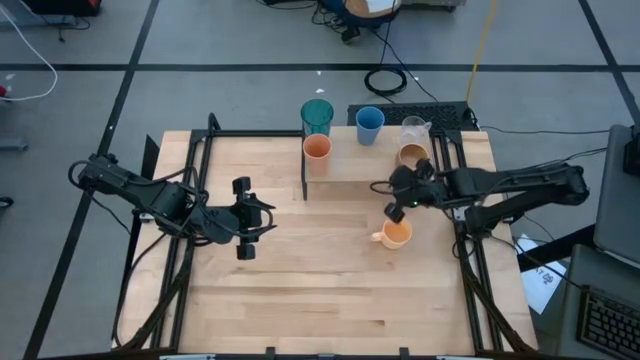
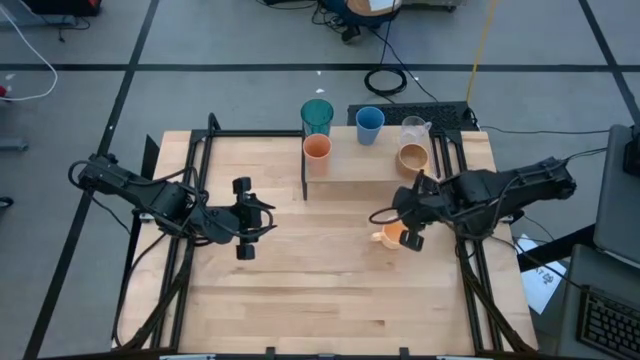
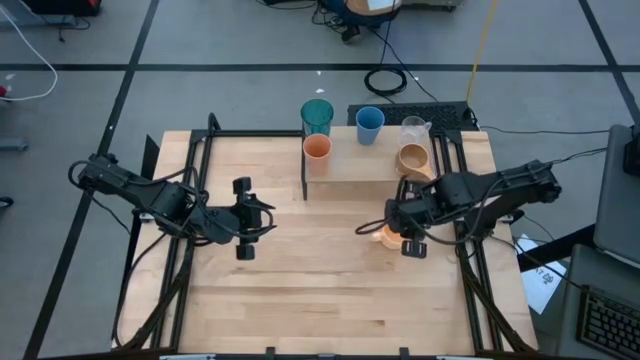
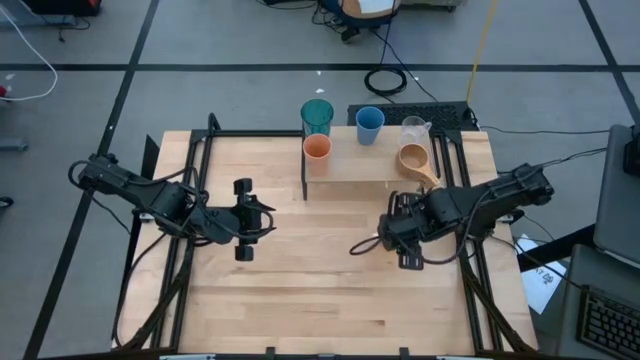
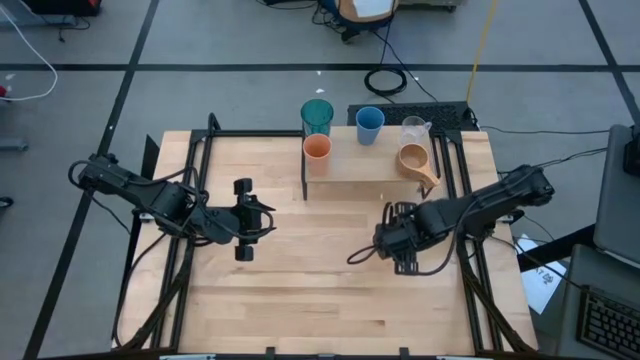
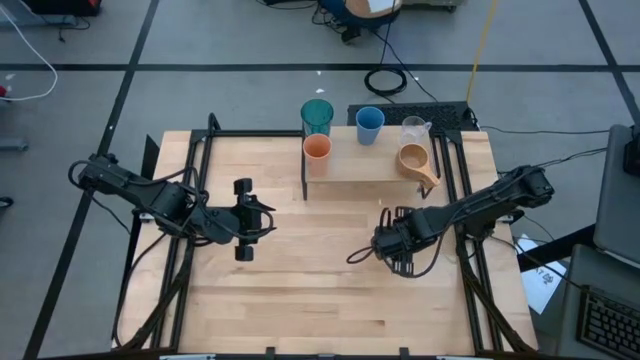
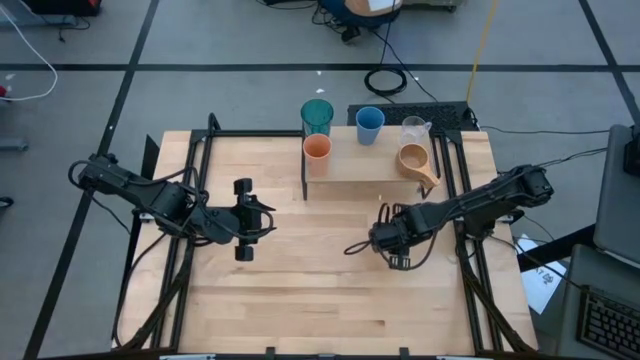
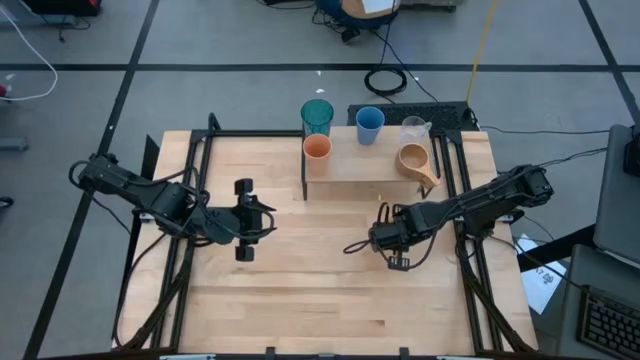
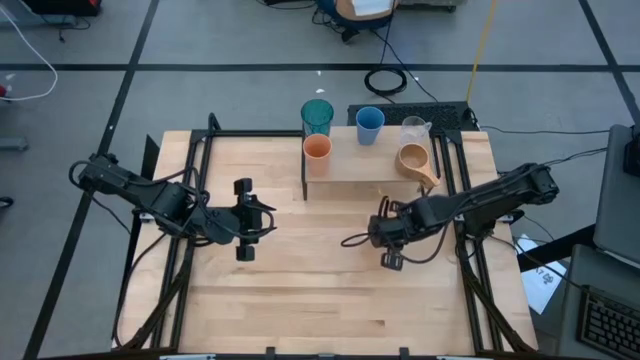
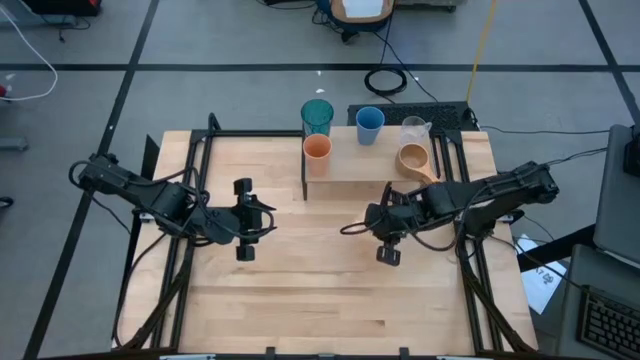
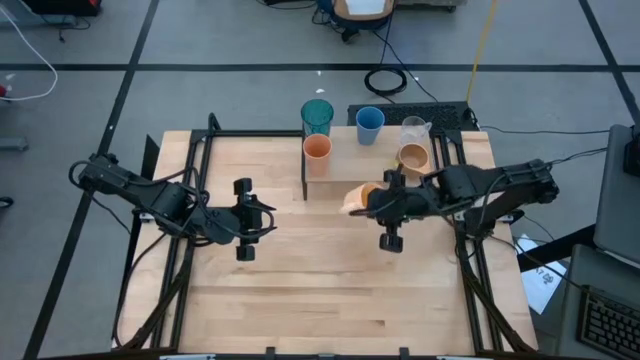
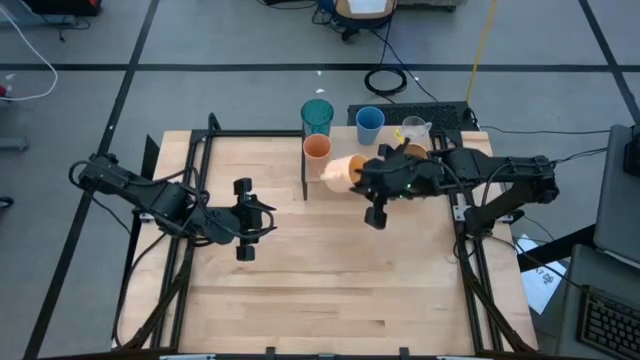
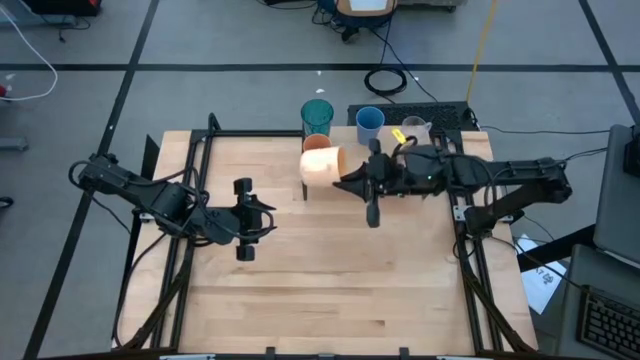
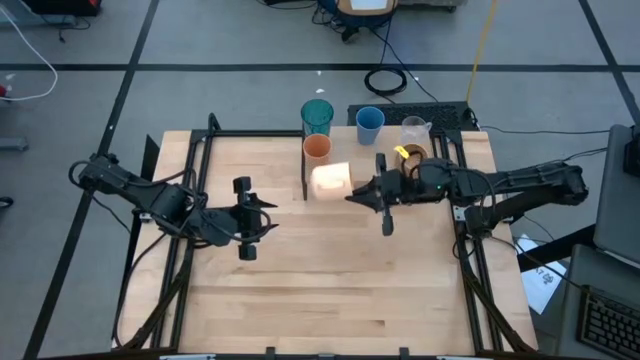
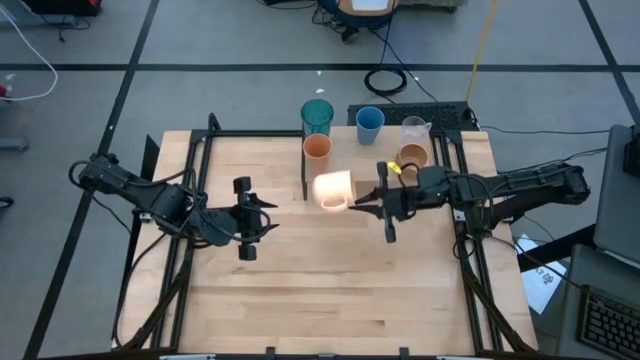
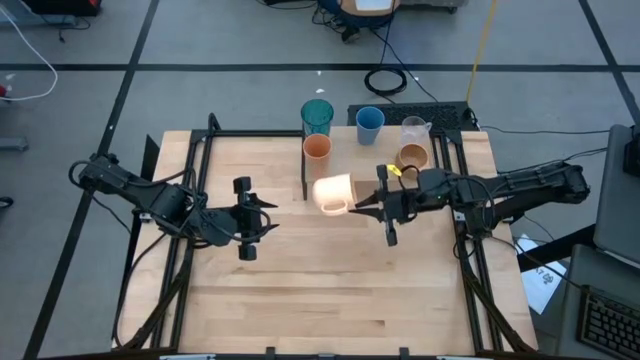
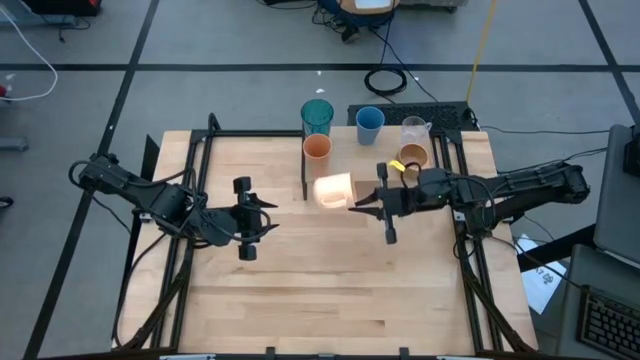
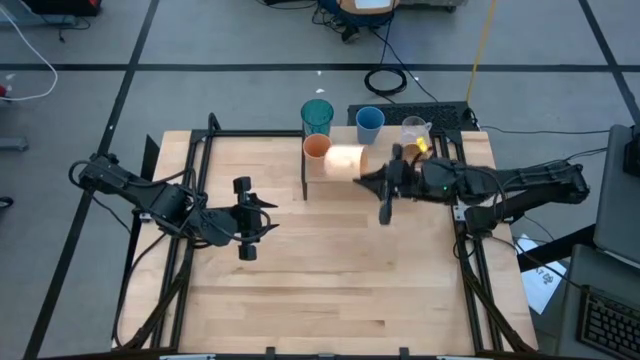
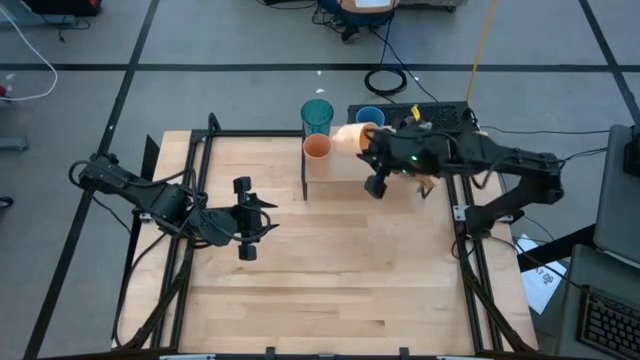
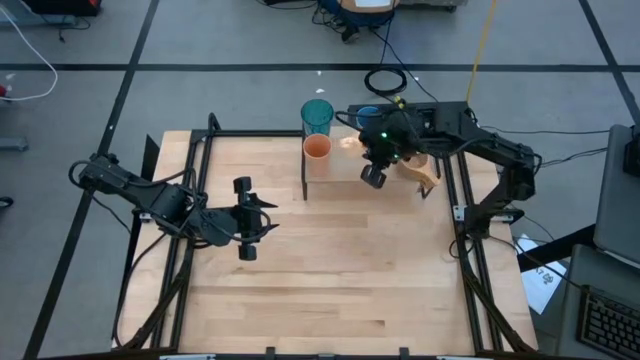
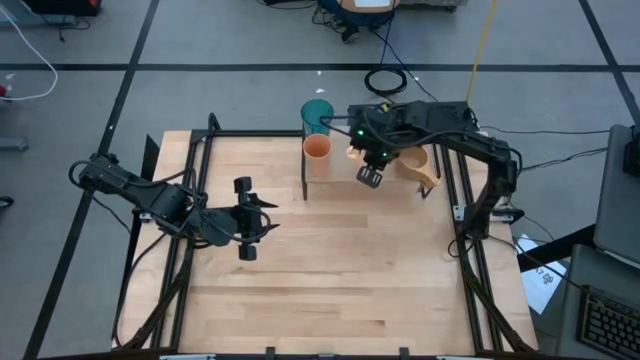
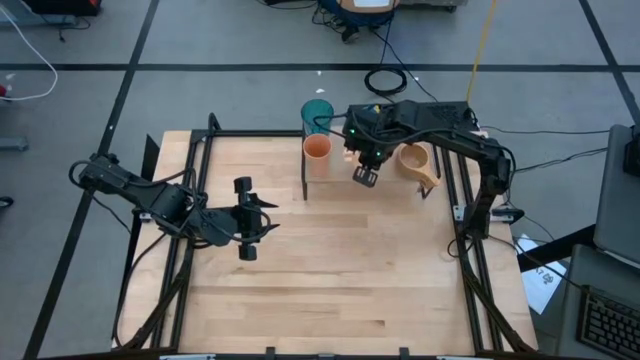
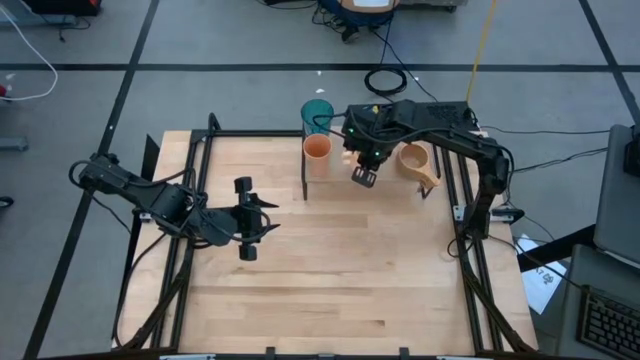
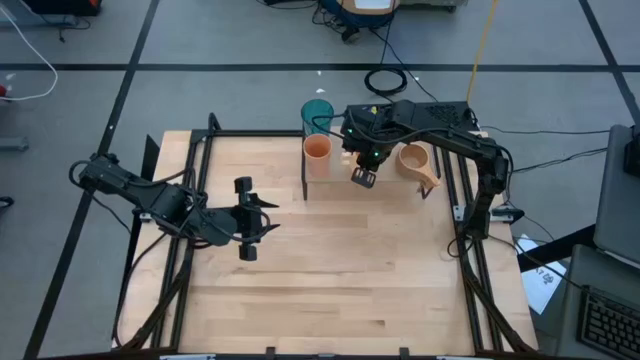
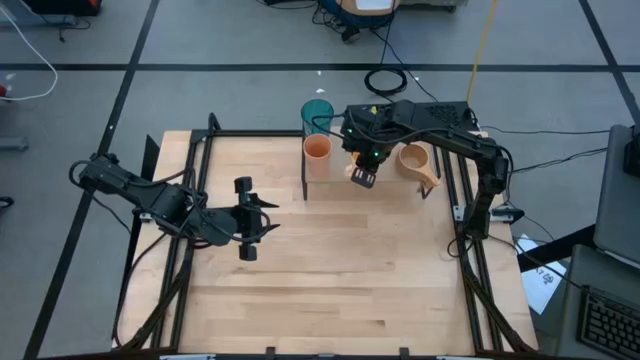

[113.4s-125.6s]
Task: Stack small to large cups/mugs on shelf
Put the light orange mug on the shelf

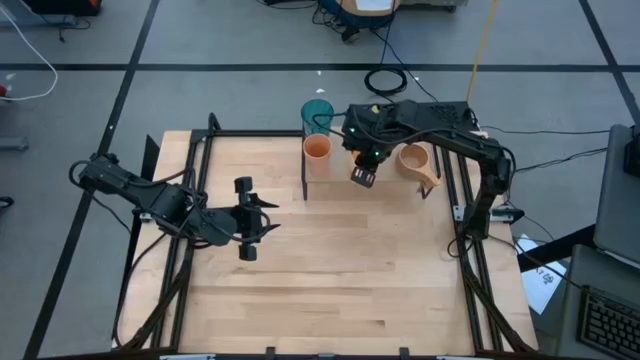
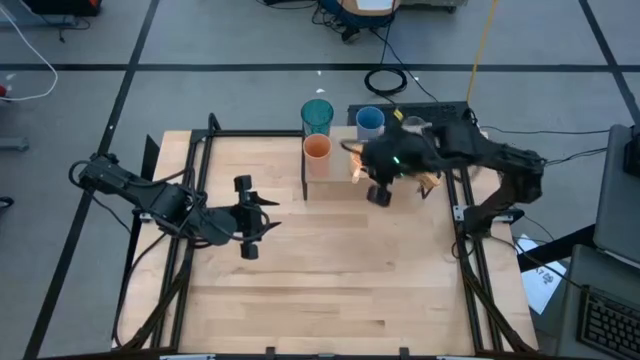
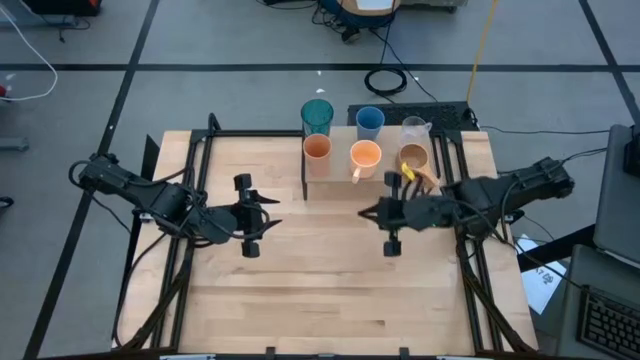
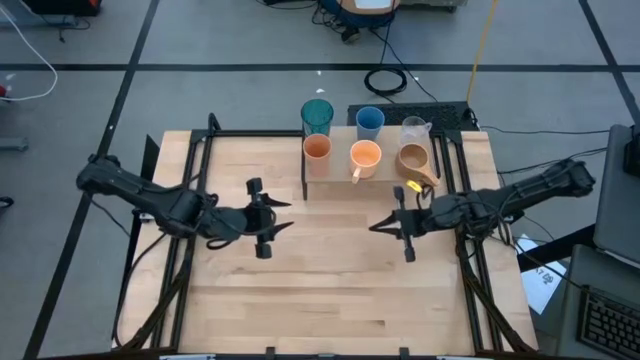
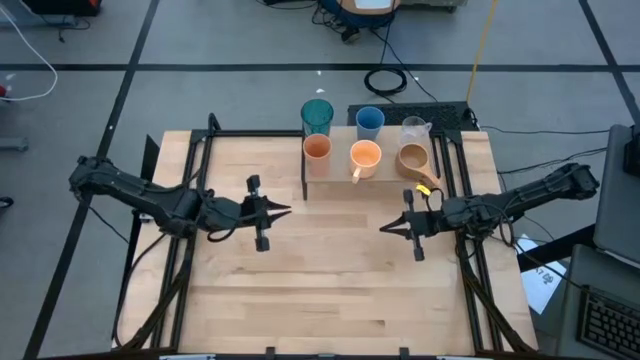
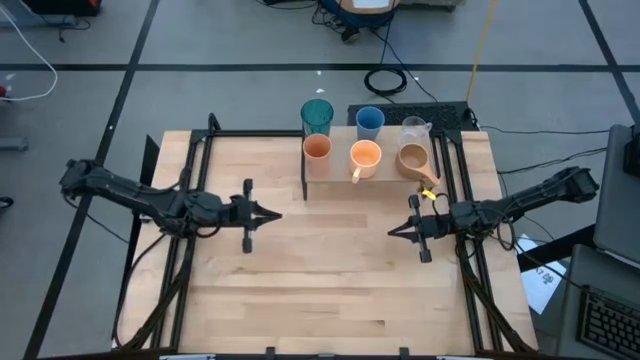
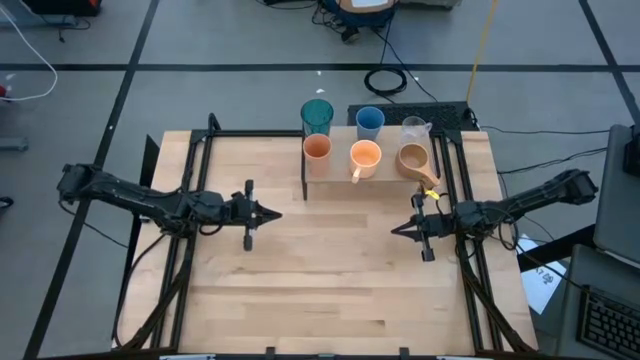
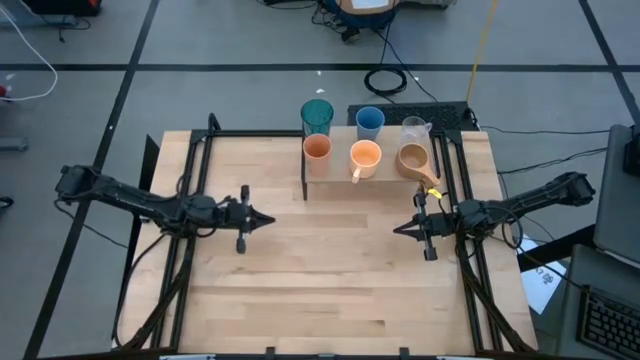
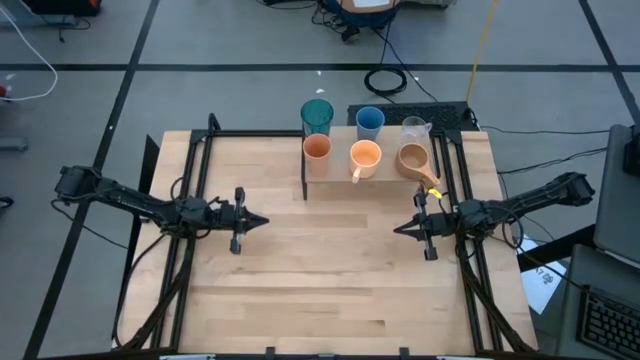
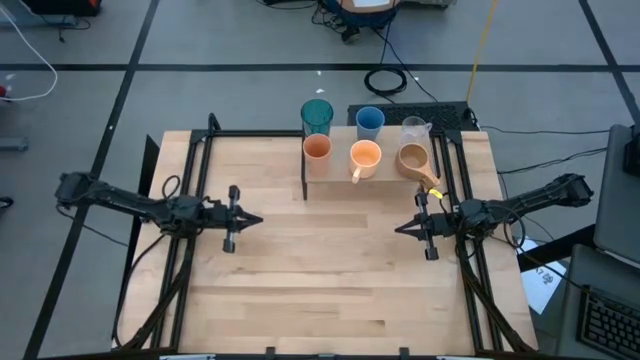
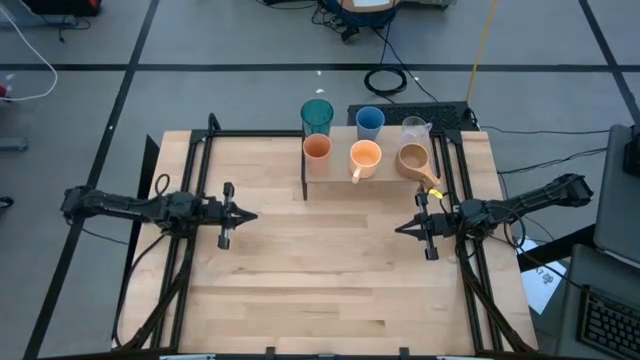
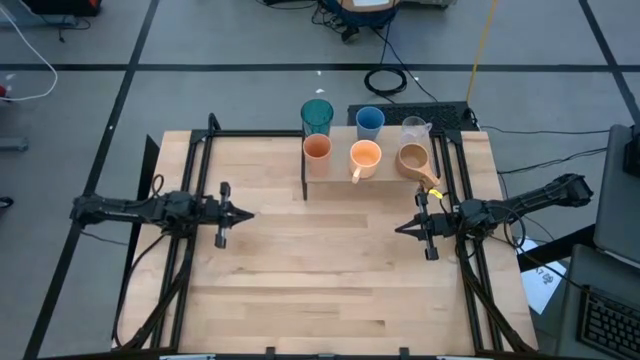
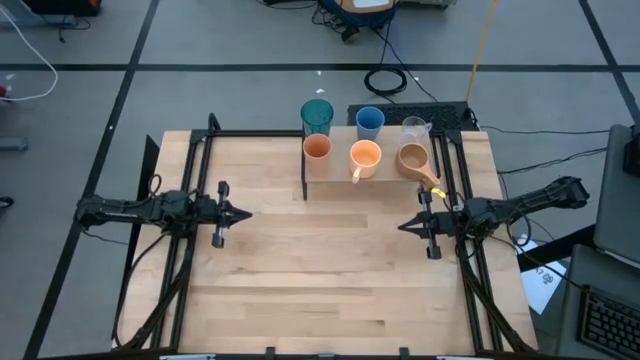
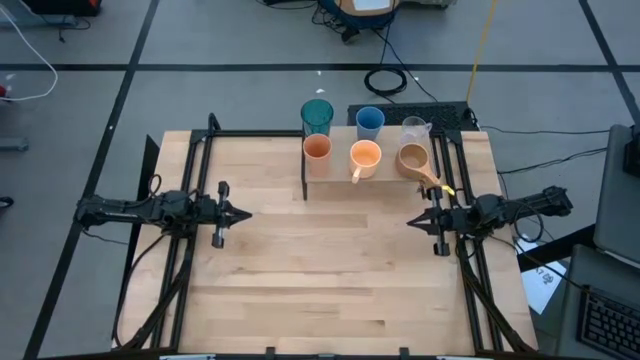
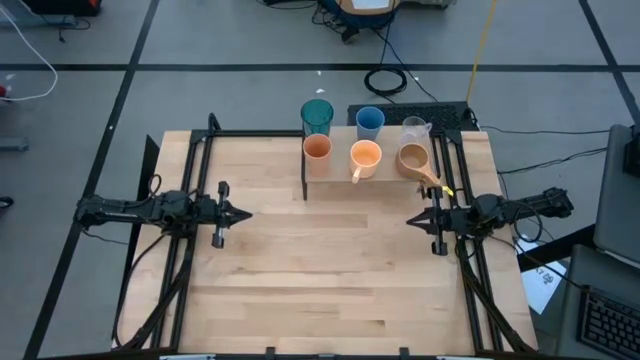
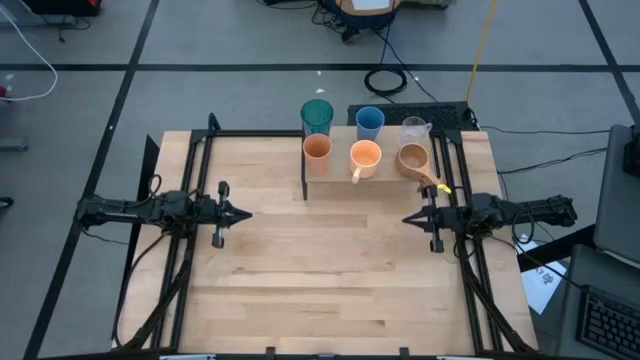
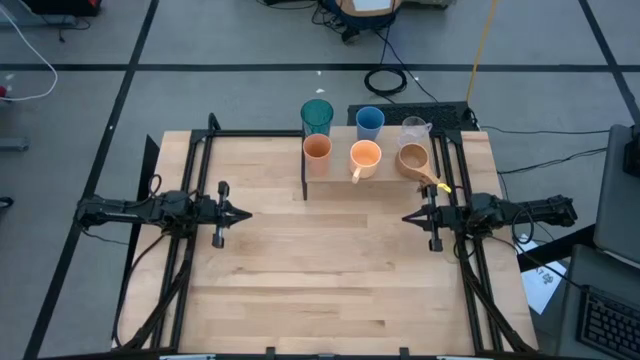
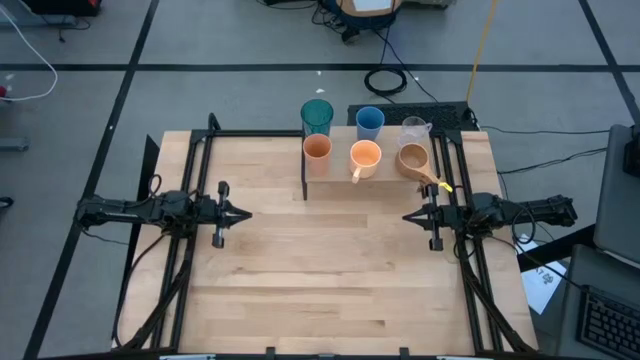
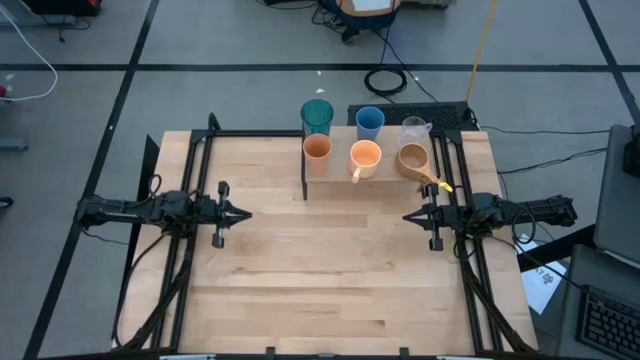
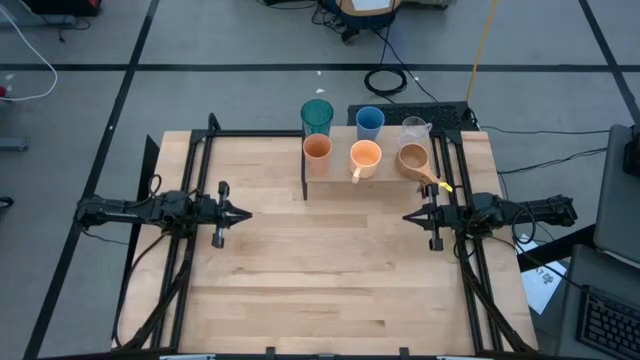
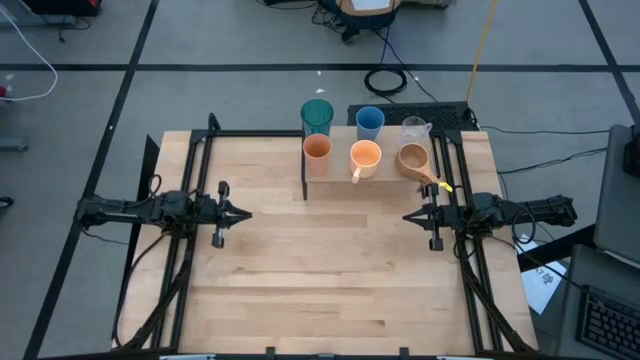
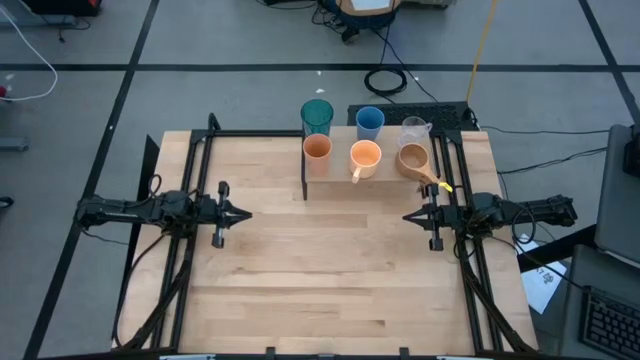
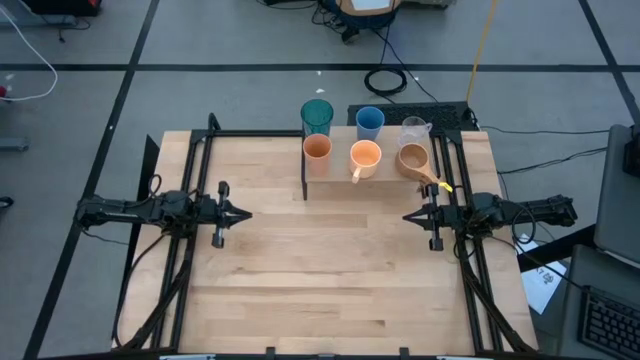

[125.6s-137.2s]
Return to Home Position
